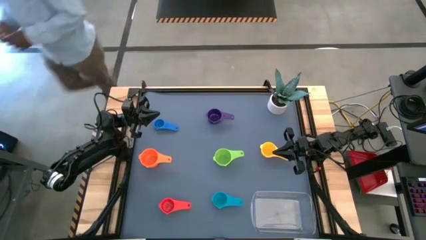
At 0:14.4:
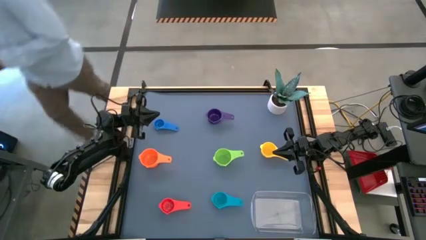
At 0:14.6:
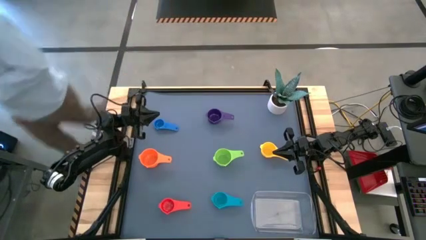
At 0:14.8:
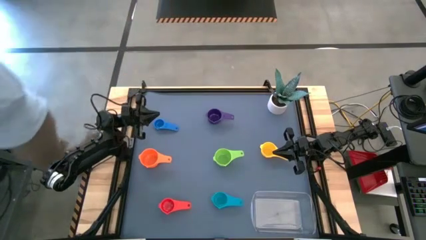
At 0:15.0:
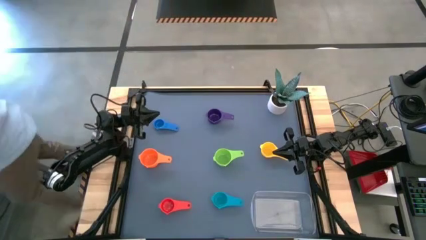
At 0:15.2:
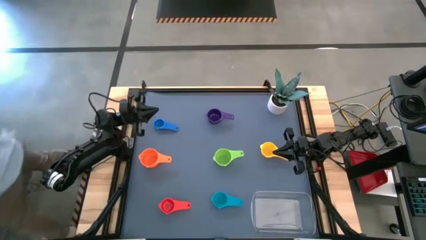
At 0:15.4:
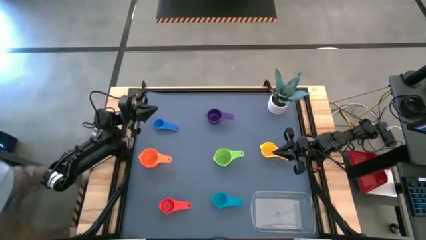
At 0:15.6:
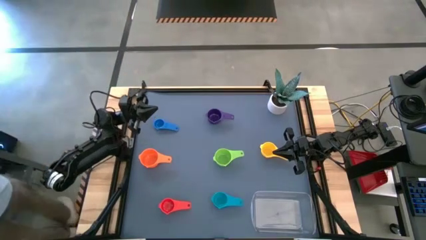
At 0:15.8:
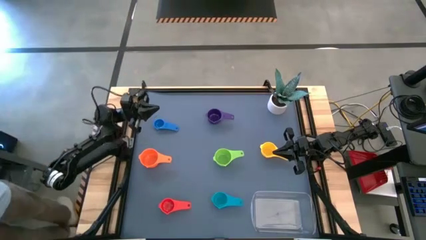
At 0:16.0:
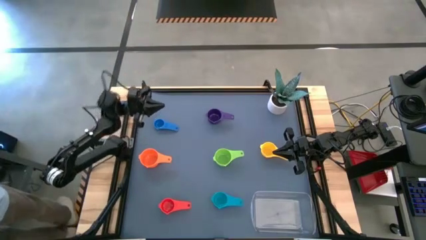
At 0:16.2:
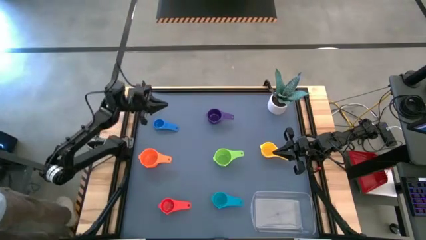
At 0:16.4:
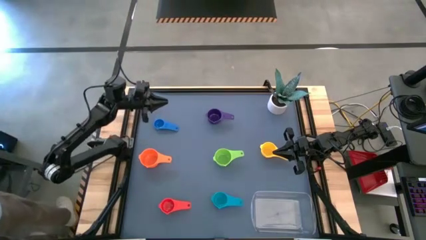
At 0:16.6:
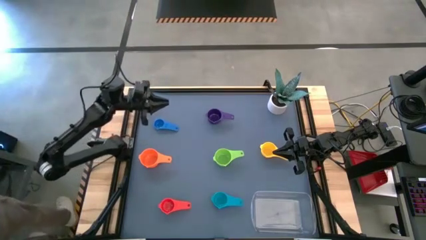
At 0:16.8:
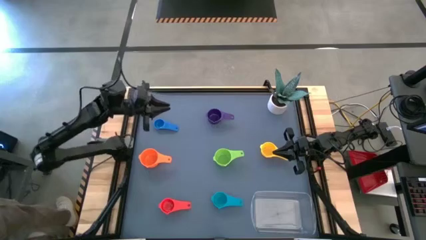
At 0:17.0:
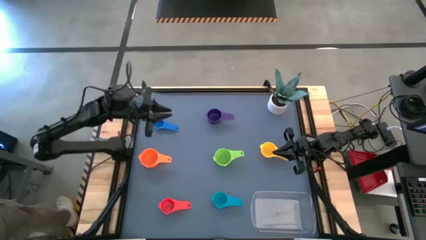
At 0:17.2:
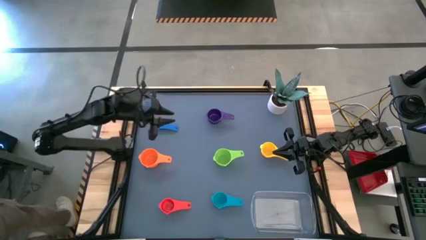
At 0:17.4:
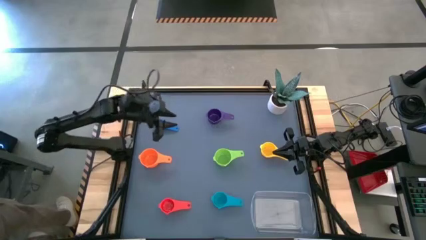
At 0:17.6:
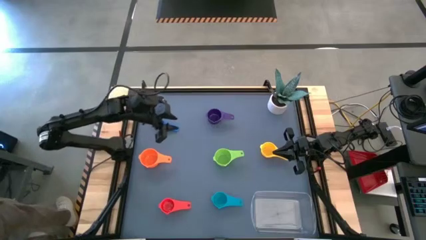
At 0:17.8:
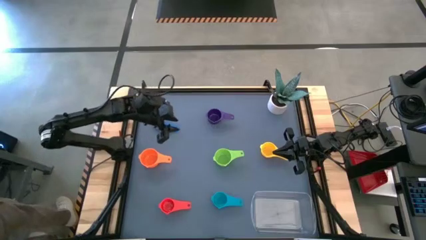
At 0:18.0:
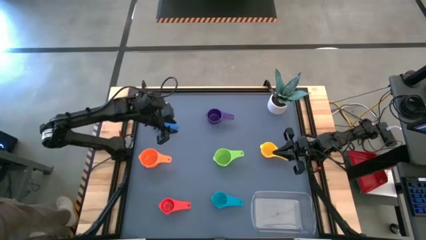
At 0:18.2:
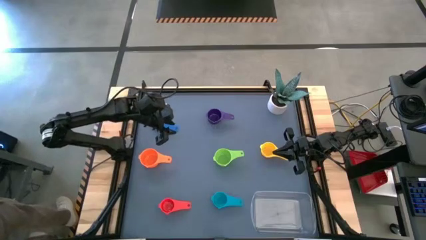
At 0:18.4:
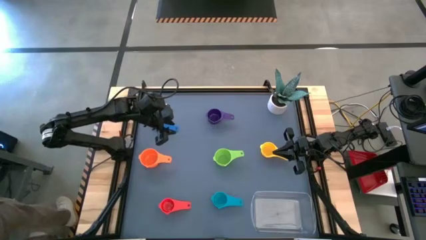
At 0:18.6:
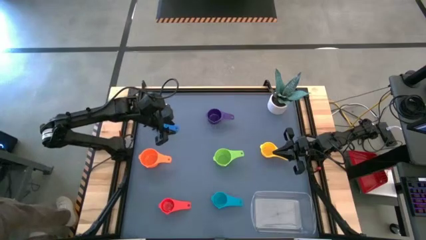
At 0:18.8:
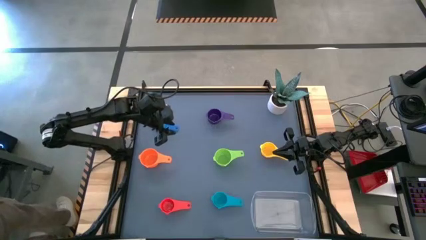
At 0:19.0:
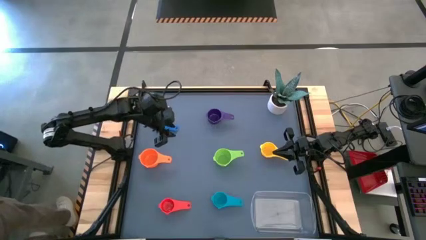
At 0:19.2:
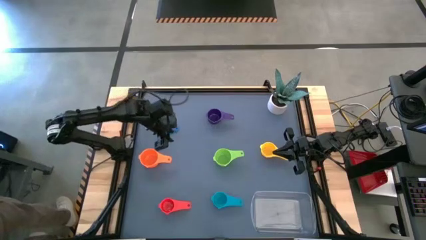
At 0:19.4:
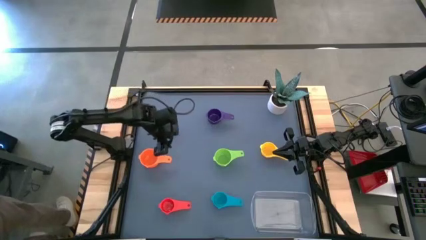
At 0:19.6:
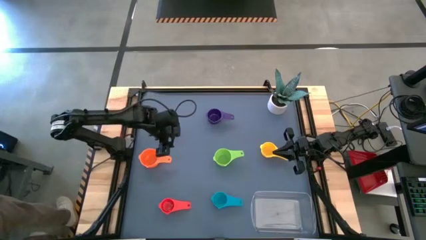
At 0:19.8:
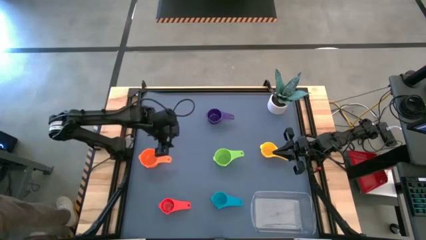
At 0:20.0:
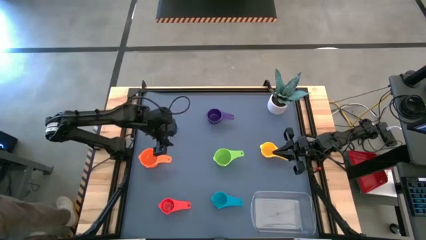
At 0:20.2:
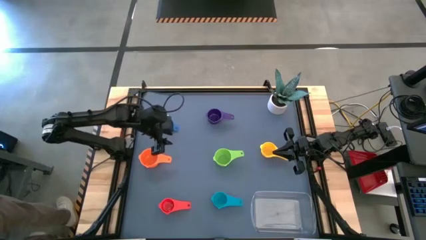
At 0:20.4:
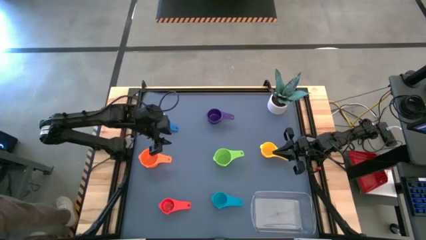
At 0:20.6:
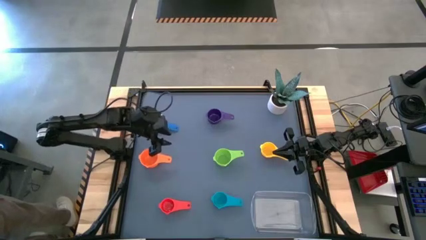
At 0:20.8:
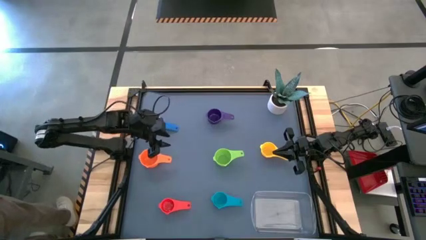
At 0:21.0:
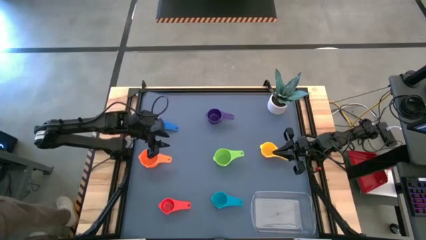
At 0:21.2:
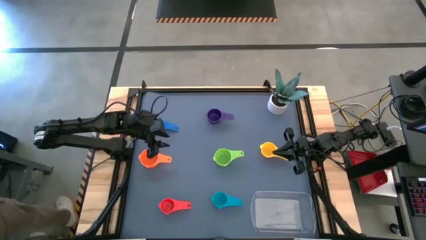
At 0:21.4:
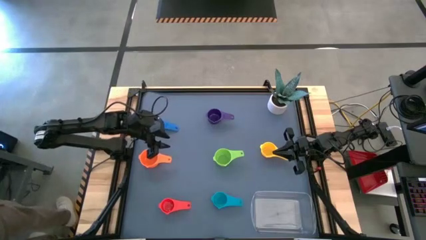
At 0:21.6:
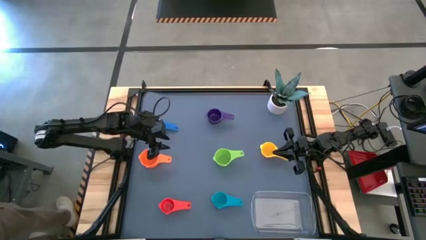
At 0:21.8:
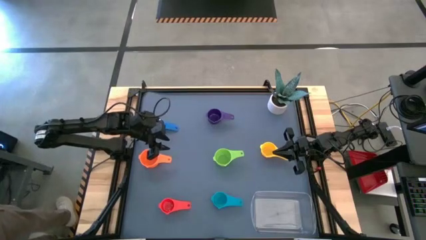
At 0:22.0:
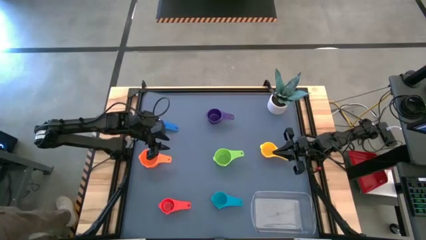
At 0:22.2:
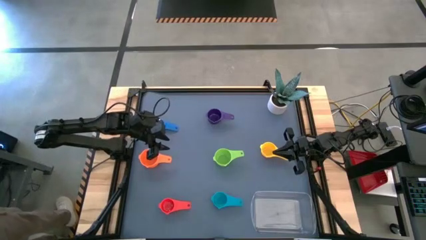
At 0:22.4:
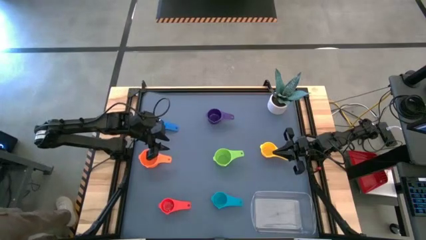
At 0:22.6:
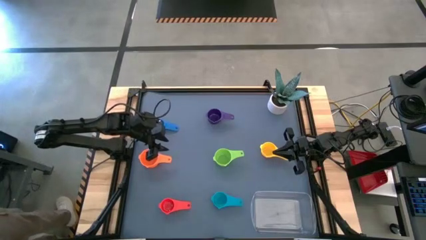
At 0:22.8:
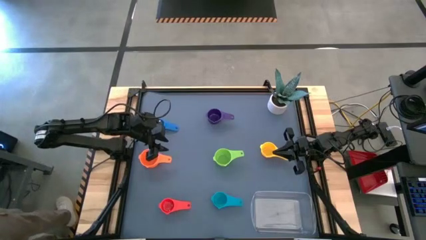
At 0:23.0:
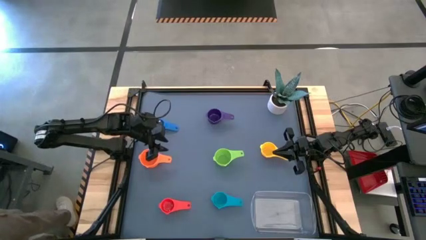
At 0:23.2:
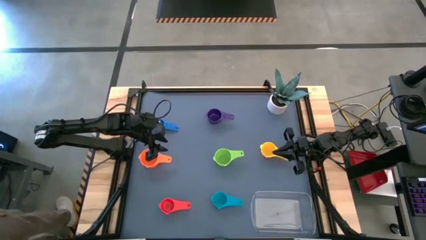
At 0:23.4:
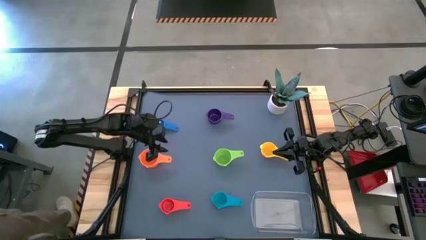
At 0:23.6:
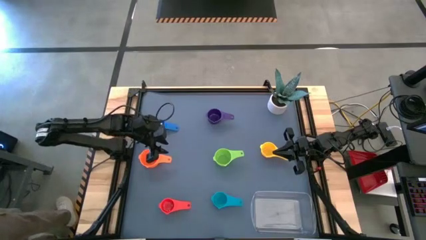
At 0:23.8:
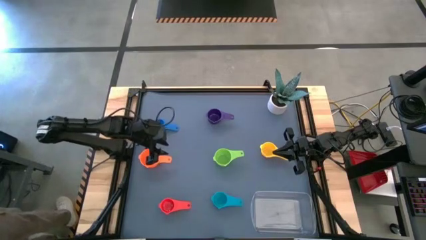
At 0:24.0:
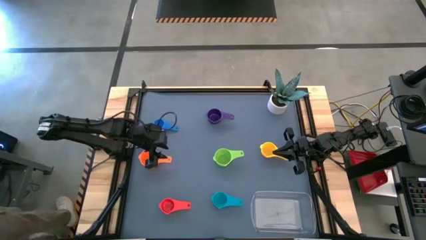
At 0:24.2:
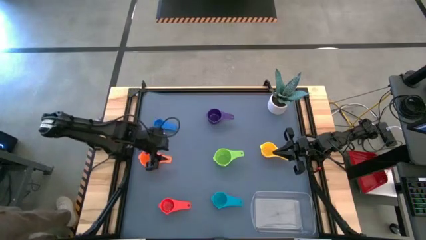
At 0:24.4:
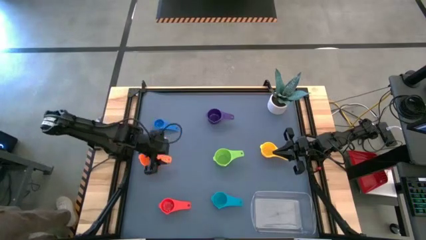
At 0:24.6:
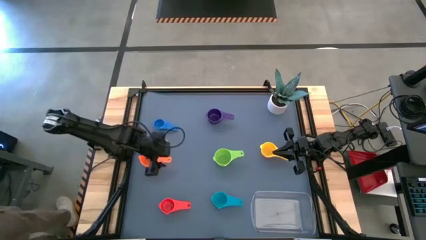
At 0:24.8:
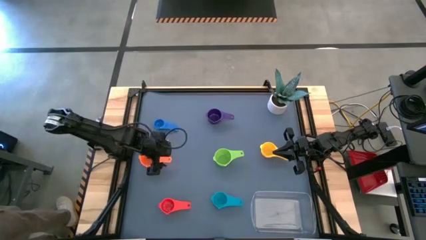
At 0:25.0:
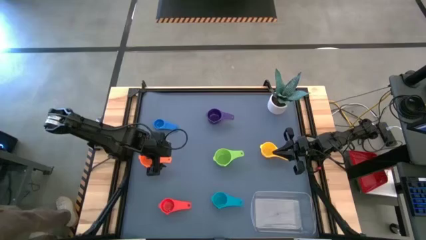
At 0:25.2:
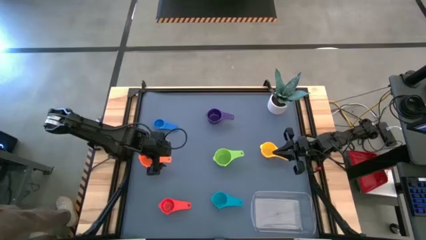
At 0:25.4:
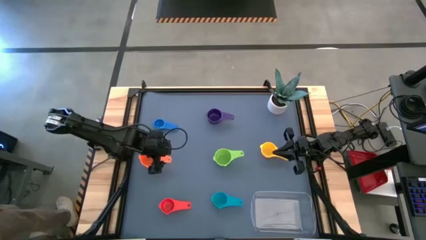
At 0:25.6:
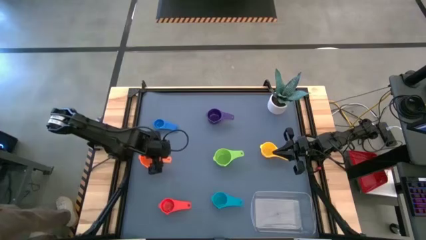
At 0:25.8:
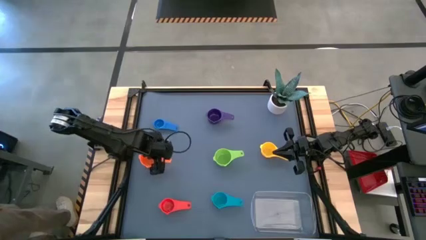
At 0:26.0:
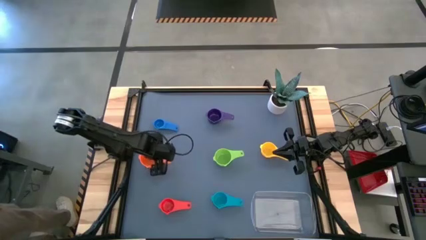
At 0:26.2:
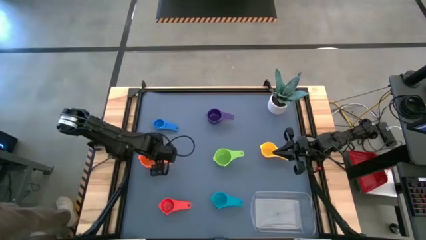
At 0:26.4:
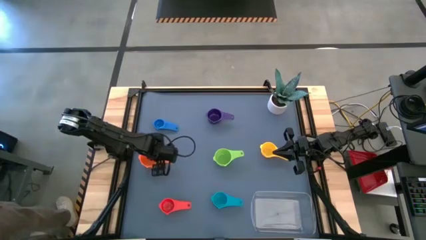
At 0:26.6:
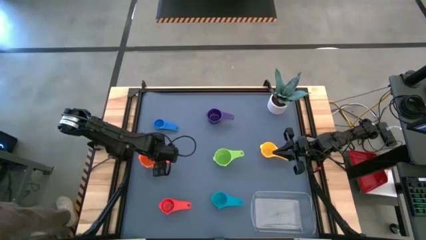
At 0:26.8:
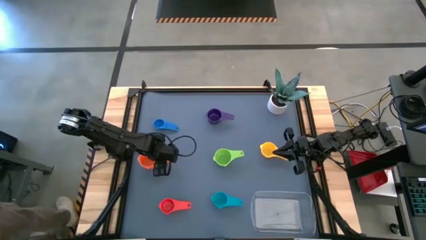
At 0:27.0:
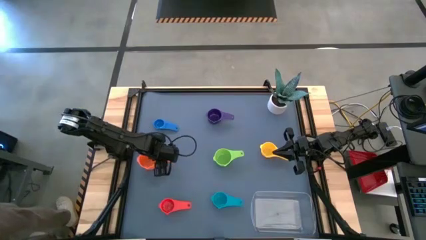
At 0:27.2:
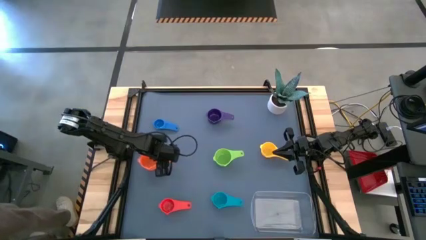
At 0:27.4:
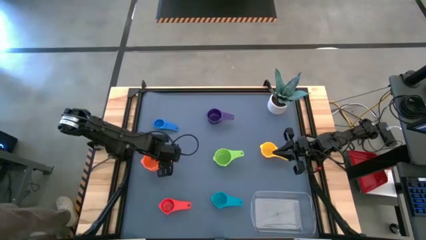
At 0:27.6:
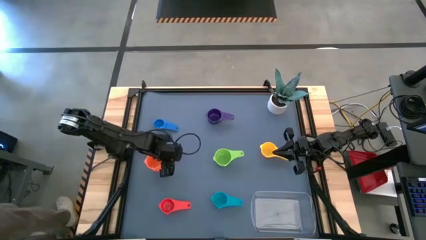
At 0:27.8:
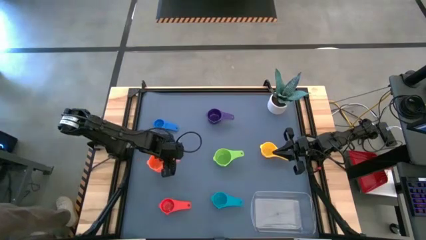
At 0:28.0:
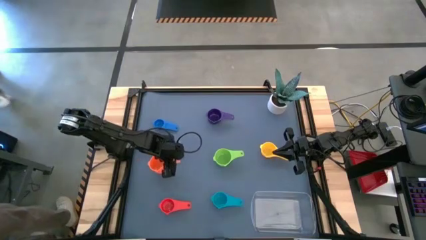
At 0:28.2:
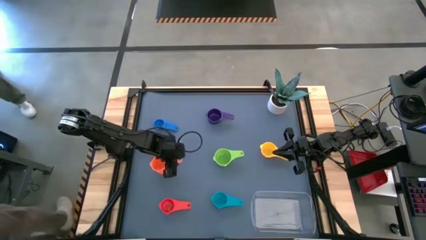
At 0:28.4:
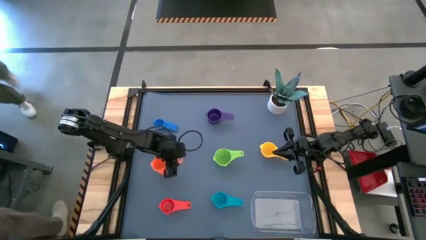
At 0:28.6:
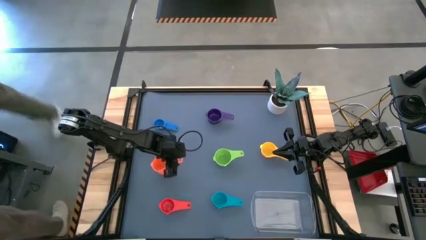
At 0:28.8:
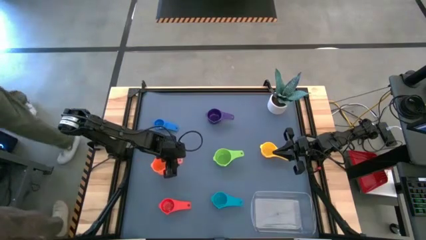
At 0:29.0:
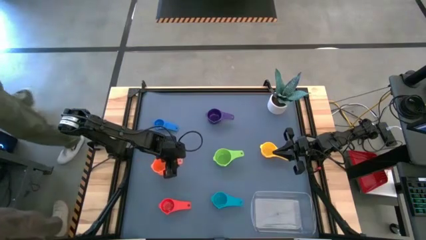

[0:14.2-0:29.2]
Task: Nest measuring cups in basket
Prepare the orange measuring cup
